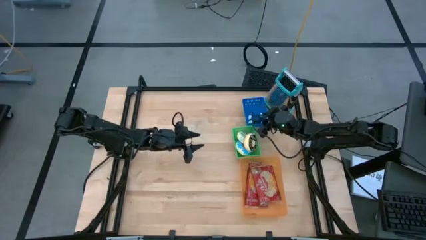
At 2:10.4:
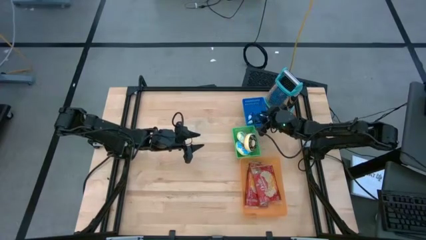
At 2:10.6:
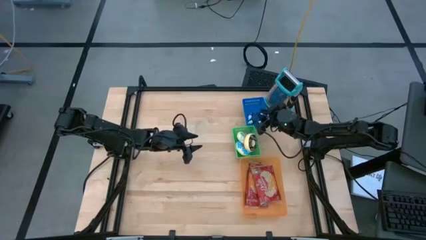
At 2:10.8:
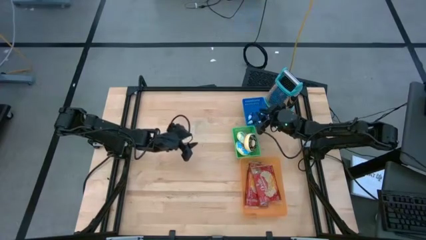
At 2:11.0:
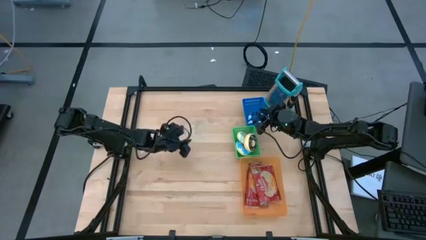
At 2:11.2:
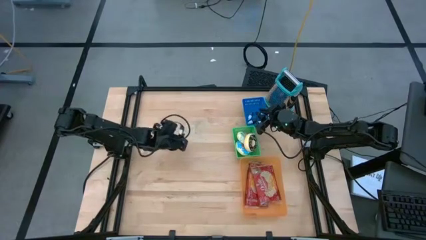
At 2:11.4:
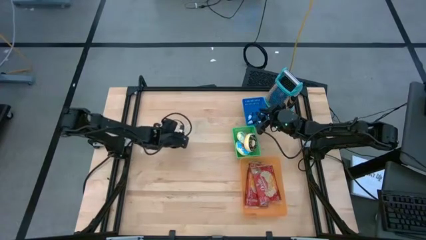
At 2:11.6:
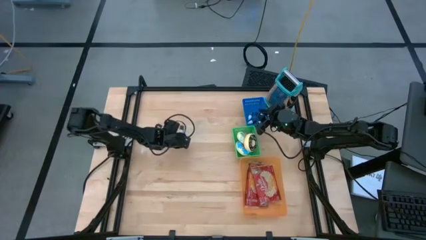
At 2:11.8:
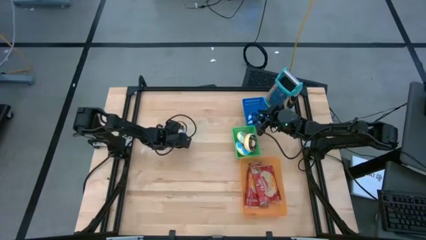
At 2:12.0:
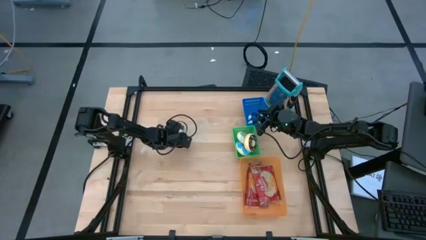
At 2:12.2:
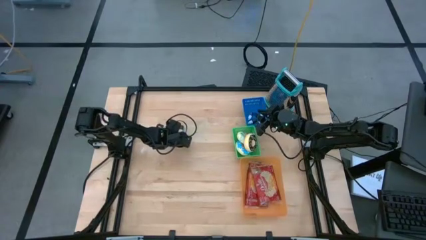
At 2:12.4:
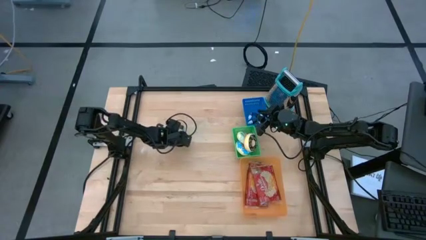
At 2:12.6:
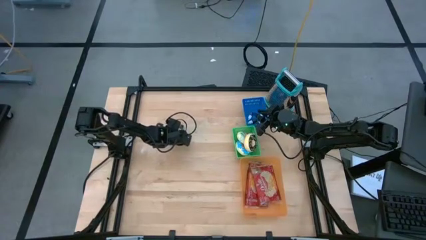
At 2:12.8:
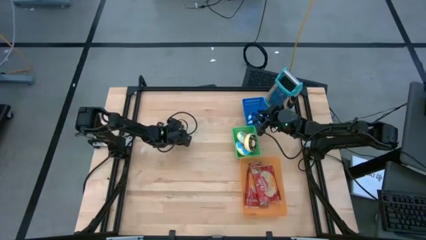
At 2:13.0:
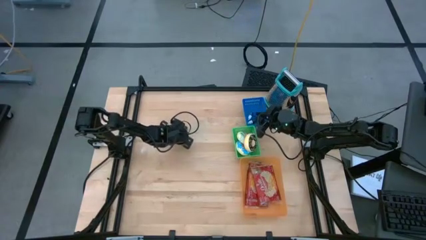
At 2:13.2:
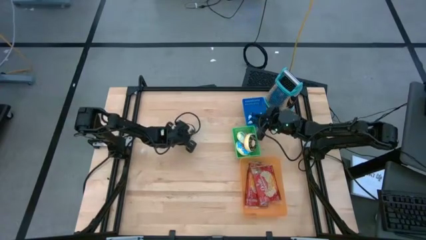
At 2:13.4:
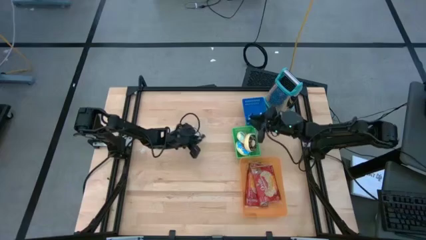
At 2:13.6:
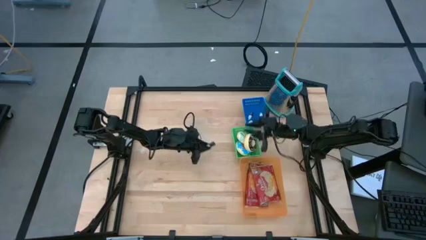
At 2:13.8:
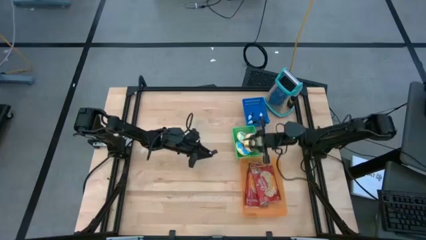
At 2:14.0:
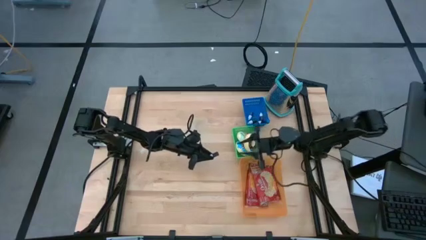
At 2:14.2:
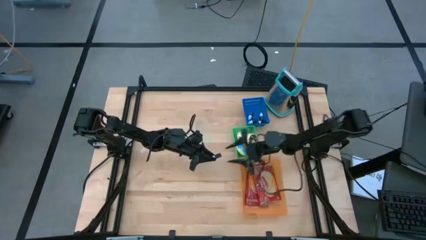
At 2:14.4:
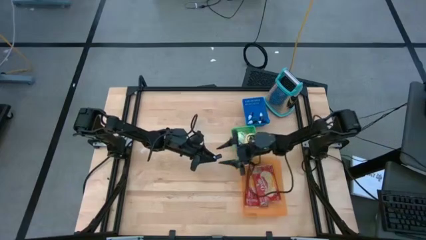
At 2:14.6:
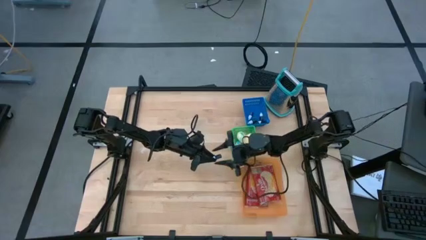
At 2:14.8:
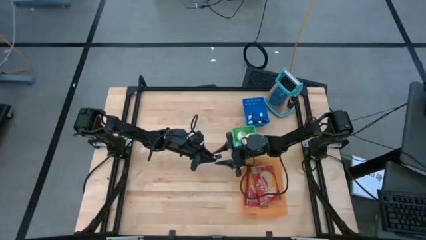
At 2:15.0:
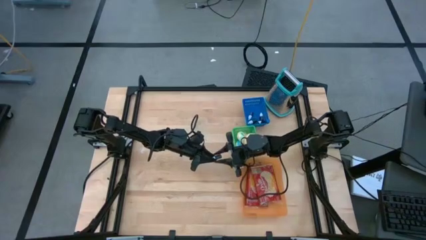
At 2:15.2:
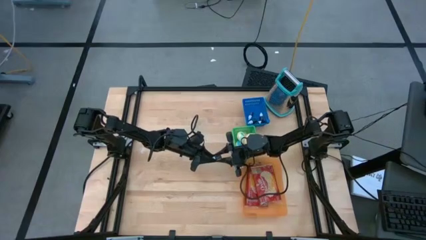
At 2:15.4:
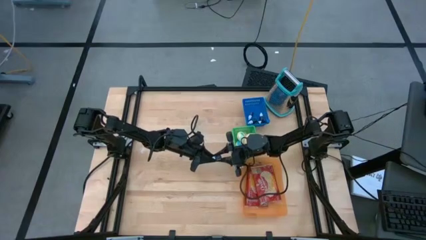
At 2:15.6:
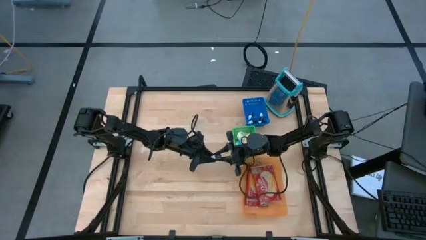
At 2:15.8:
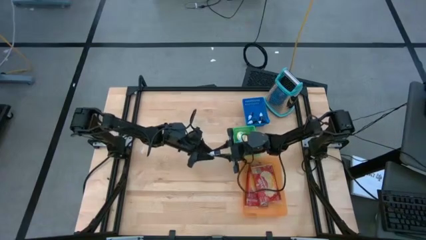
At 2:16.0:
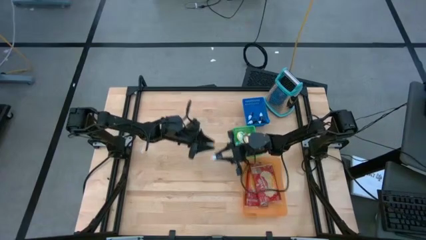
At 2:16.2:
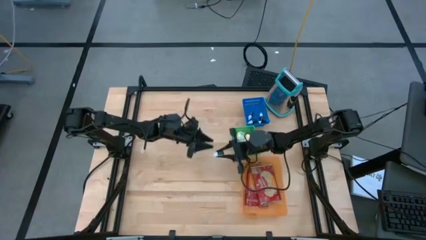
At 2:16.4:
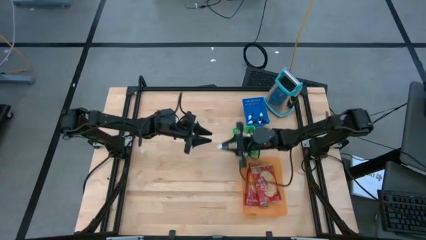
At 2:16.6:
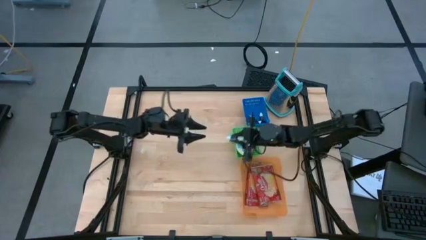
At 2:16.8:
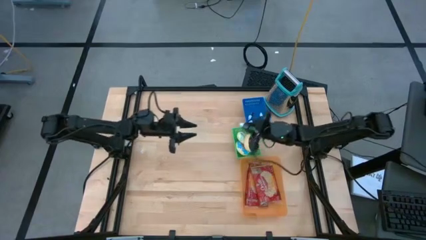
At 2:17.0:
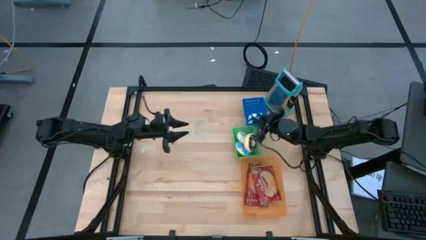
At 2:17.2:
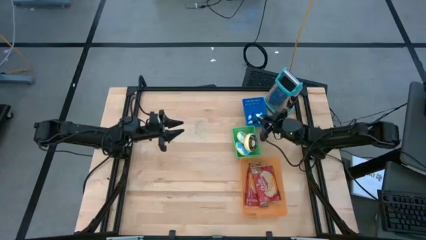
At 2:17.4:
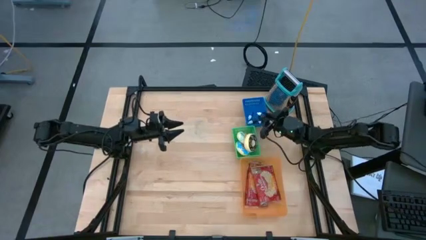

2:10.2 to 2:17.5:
Put the green food coloring bottle into the blue bin

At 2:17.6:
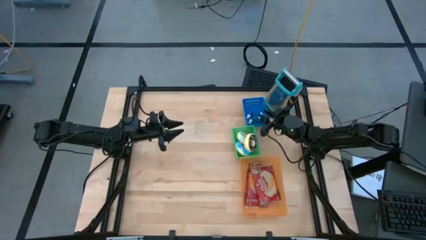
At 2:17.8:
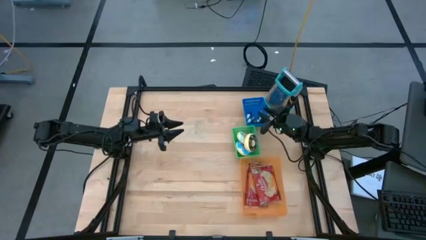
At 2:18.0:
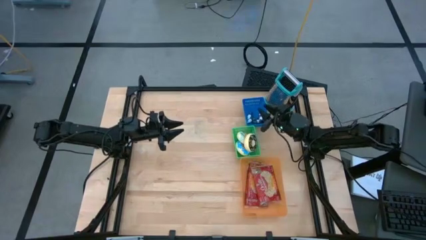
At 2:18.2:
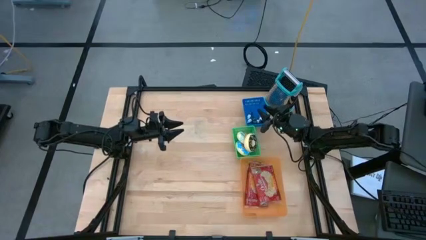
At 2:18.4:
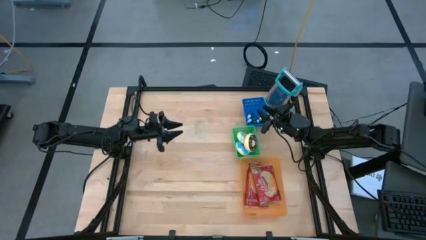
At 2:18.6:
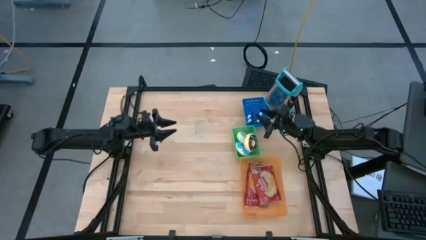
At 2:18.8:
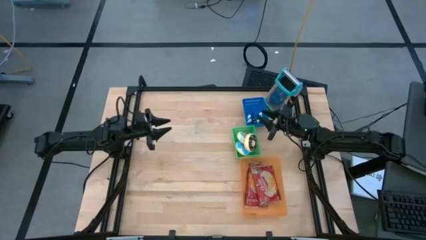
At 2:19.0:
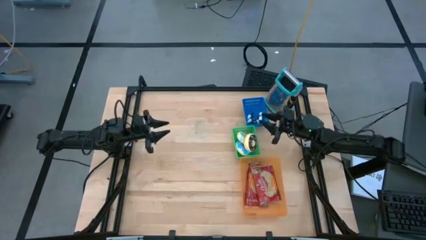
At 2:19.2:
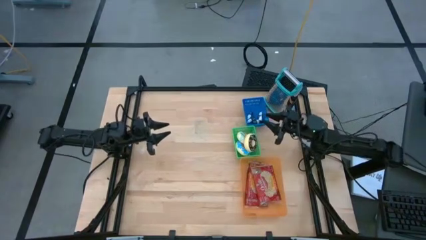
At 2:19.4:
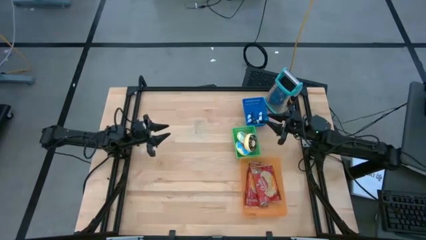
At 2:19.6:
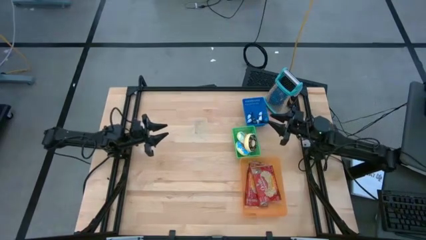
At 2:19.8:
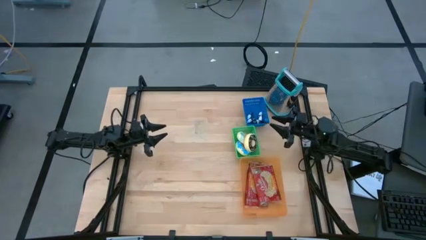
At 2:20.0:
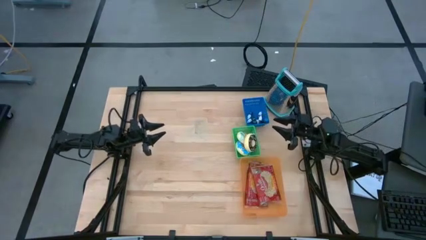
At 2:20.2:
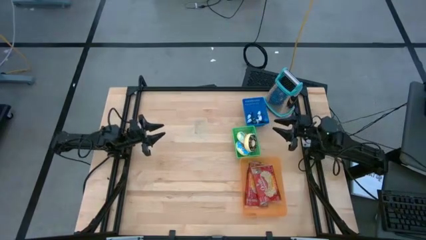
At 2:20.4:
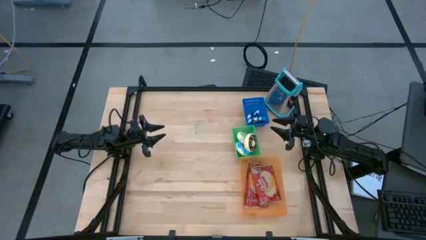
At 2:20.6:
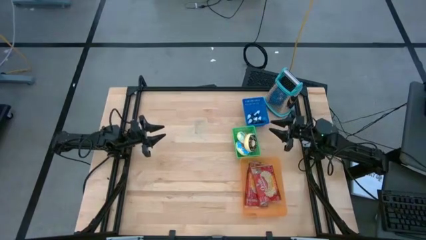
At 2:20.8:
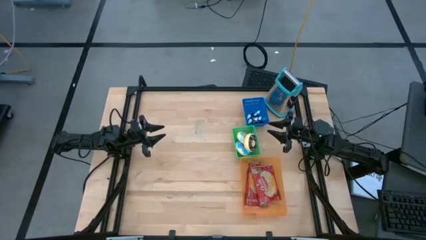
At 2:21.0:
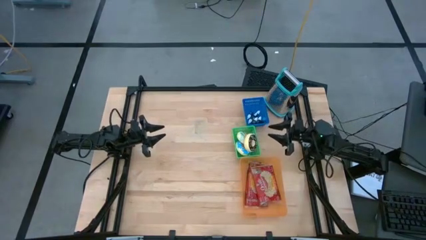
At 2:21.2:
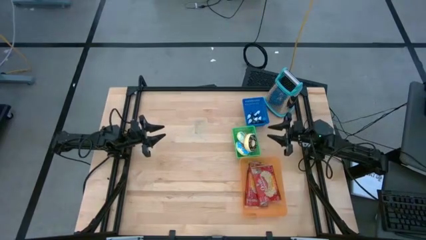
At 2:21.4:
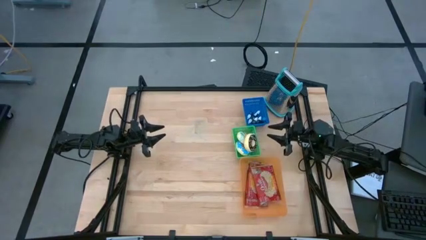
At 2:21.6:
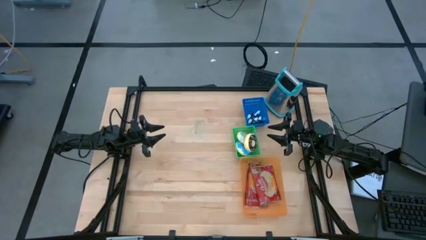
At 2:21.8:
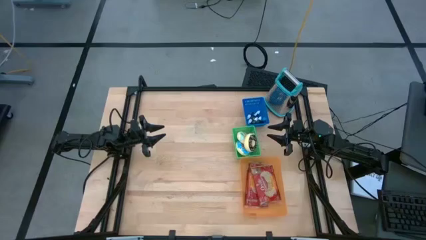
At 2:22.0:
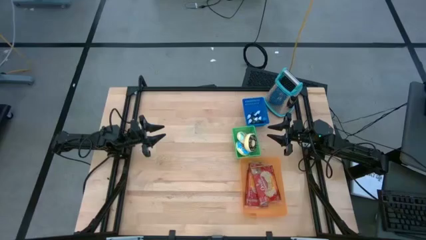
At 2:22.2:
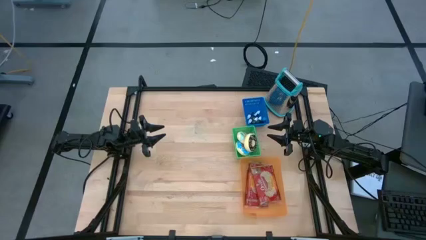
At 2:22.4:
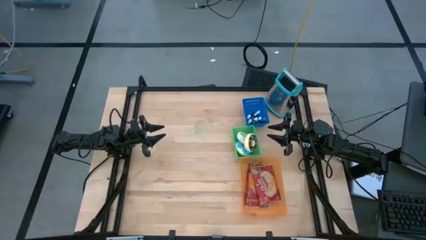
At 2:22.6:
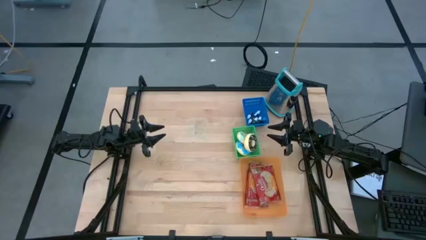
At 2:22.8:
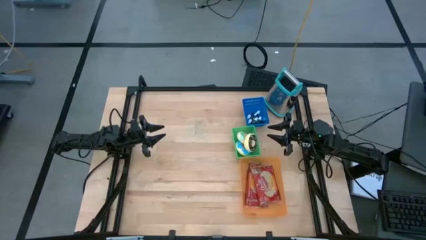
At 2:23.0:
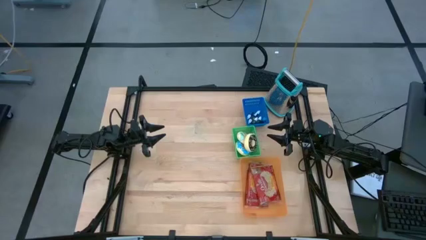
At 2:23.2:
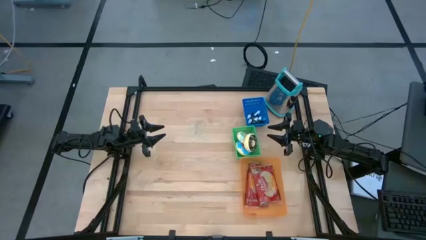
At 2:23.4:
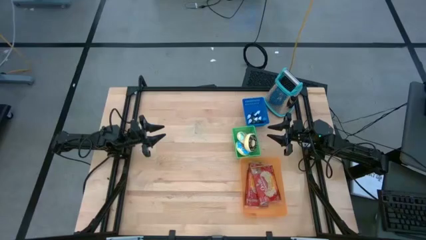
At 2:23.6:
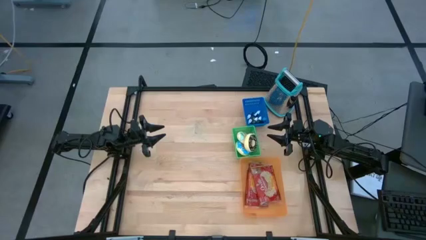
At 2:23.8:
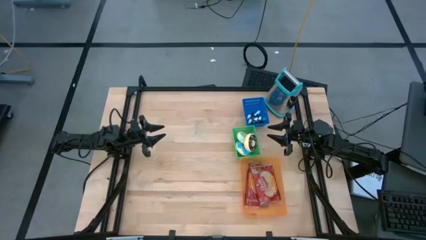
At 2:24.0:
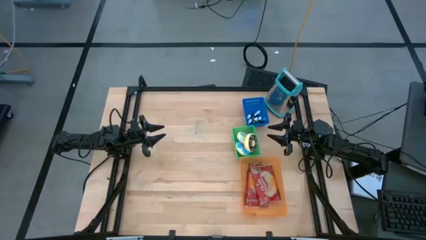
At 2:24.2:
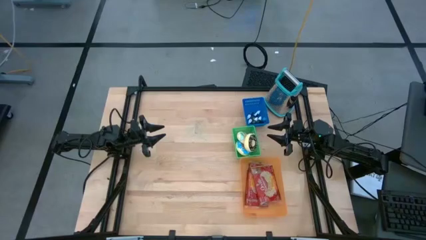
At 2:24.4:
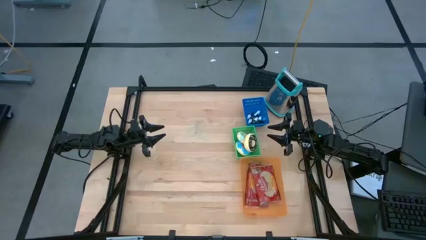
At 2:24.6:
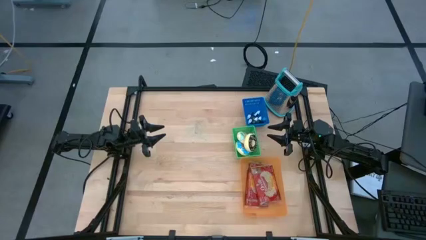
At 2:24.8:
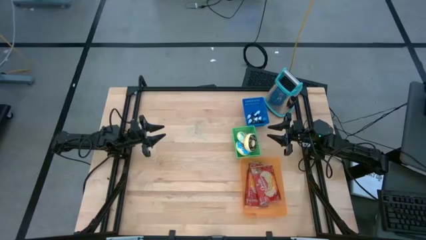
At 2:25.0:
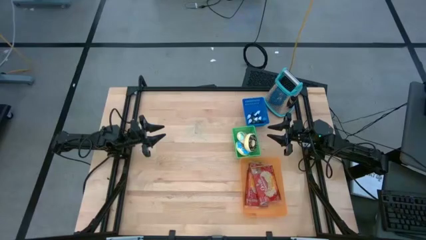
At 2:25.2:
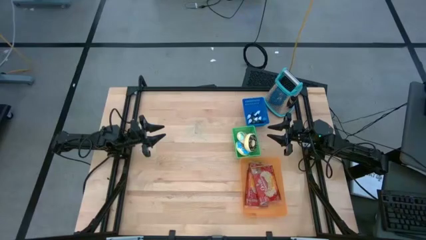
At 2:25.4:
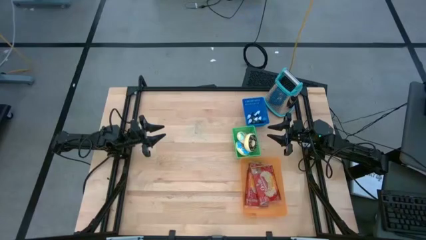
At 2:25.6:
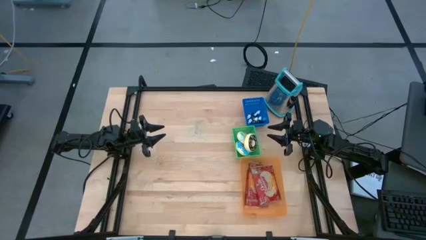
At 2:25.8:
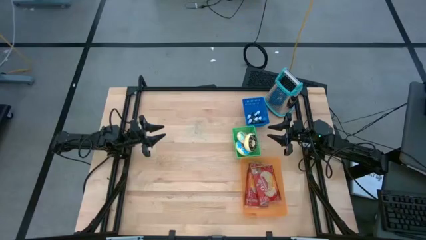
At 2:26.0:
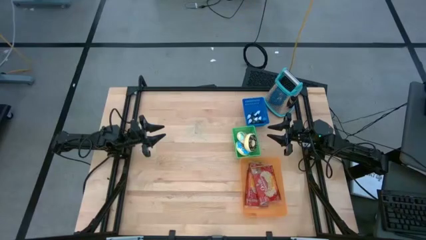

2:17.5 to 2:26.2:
Return to Home Position
